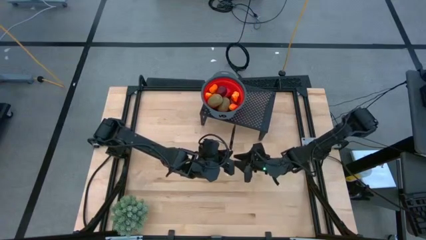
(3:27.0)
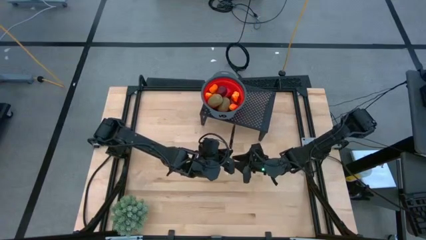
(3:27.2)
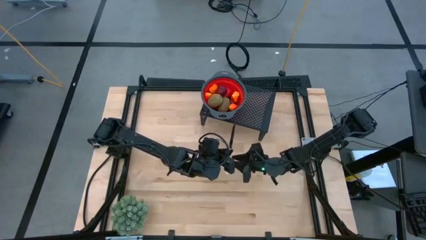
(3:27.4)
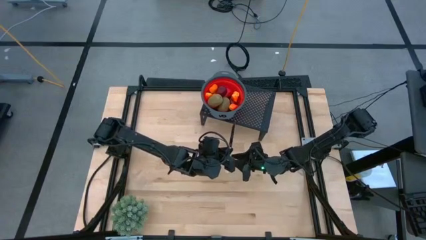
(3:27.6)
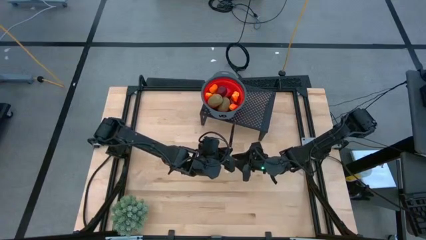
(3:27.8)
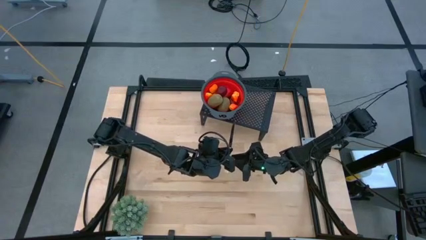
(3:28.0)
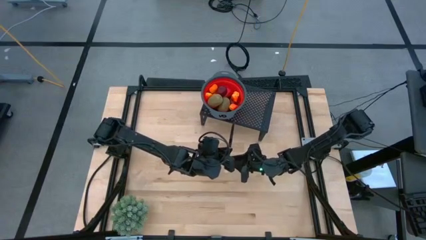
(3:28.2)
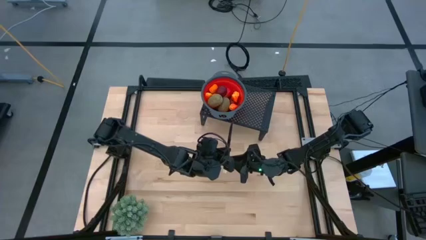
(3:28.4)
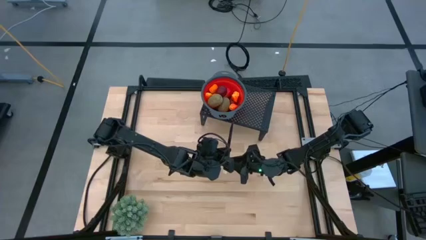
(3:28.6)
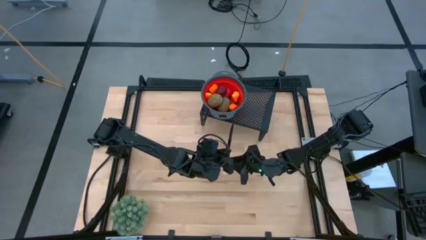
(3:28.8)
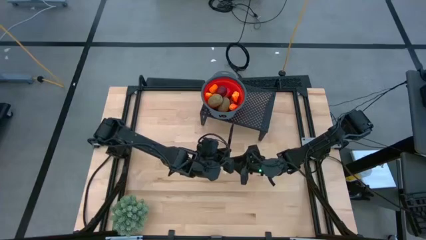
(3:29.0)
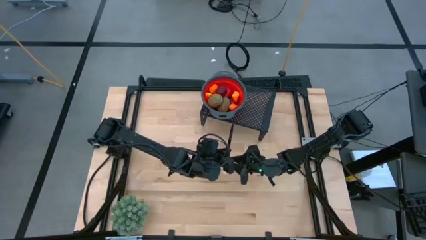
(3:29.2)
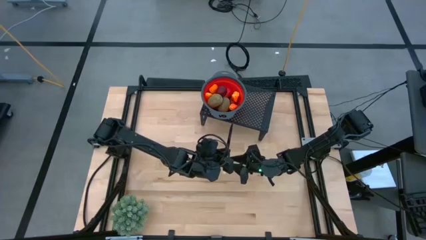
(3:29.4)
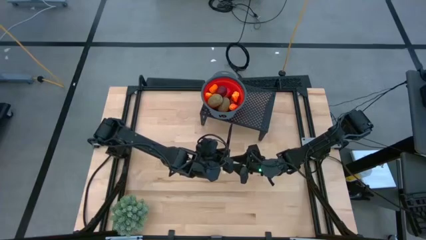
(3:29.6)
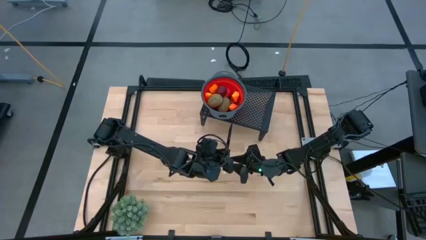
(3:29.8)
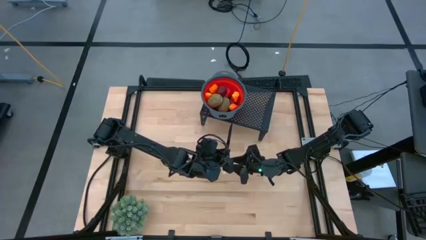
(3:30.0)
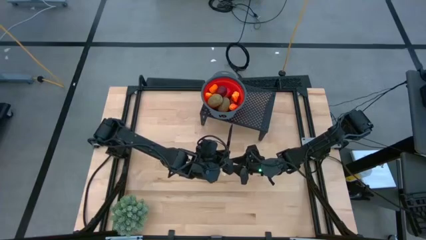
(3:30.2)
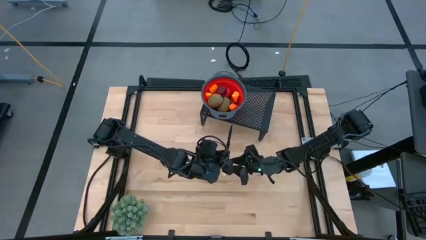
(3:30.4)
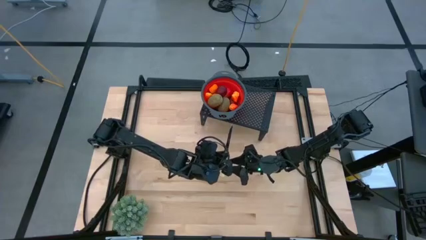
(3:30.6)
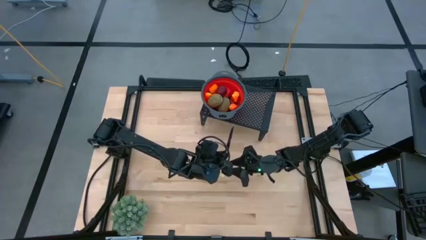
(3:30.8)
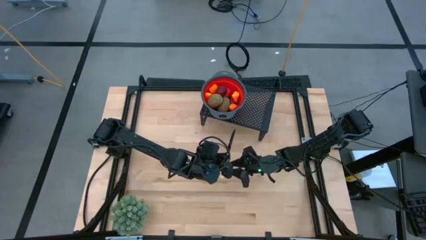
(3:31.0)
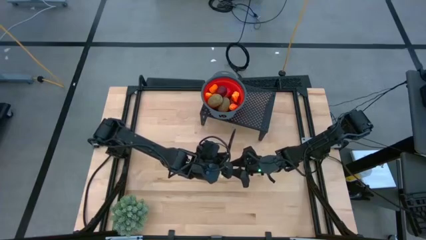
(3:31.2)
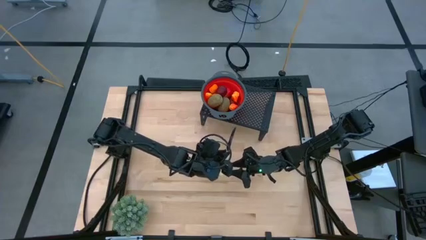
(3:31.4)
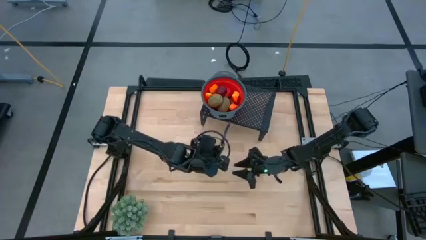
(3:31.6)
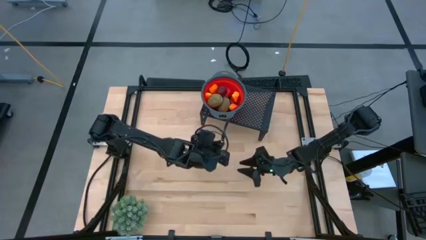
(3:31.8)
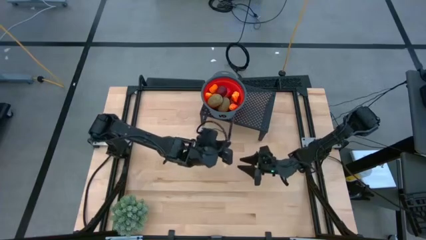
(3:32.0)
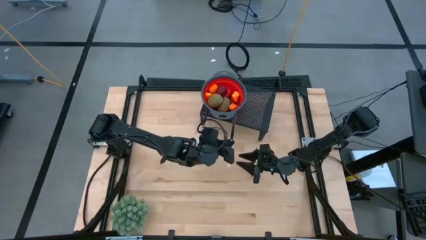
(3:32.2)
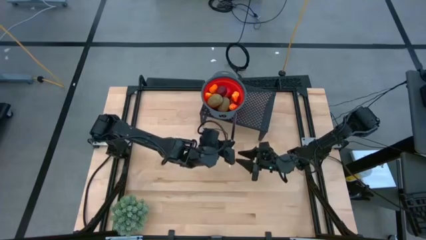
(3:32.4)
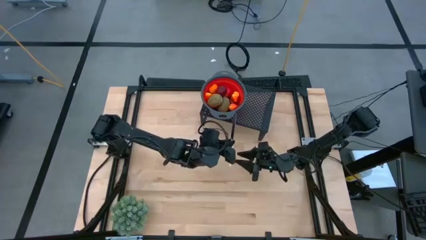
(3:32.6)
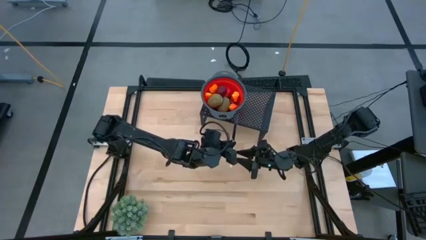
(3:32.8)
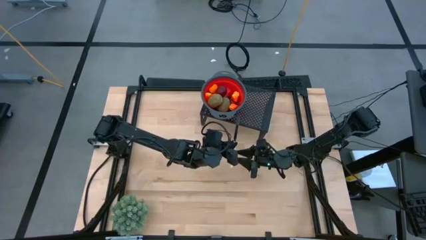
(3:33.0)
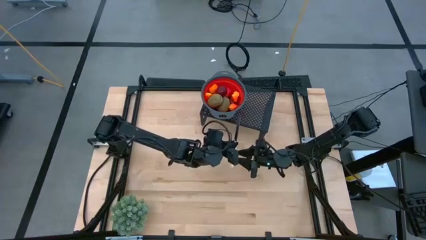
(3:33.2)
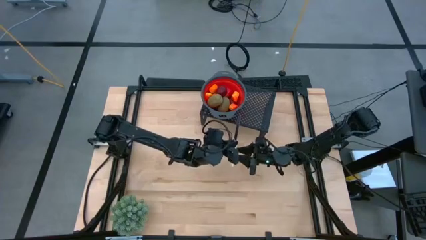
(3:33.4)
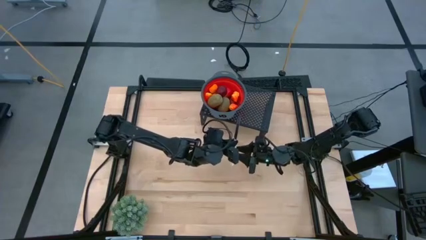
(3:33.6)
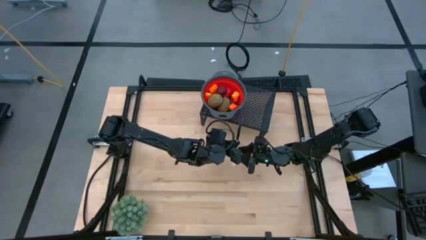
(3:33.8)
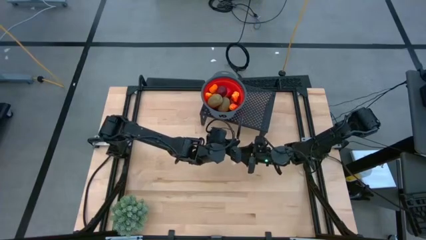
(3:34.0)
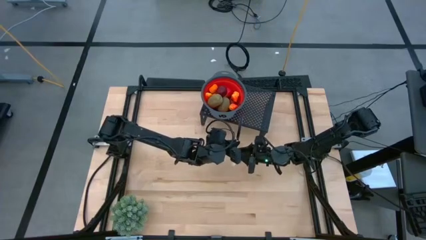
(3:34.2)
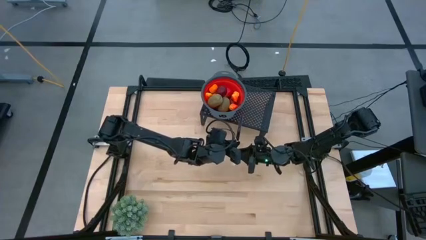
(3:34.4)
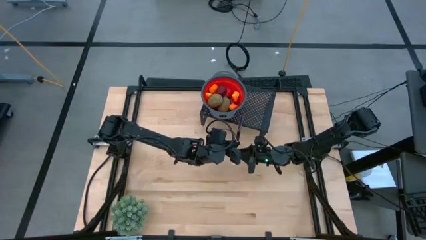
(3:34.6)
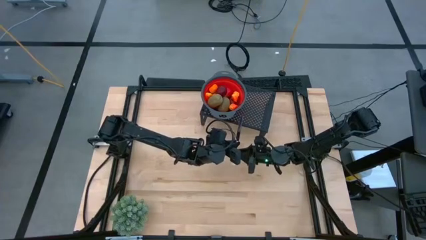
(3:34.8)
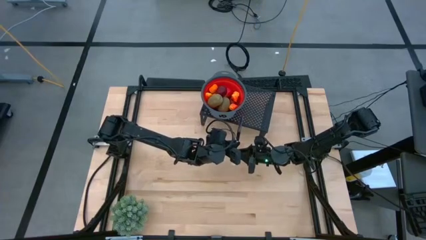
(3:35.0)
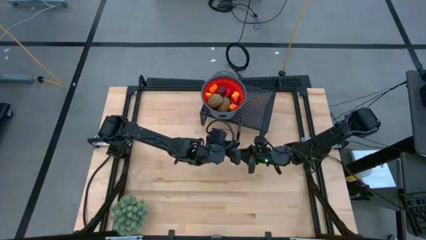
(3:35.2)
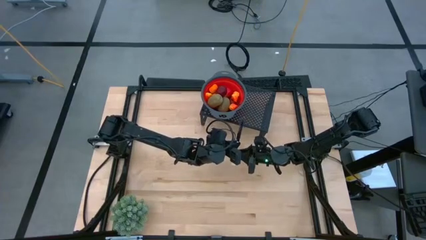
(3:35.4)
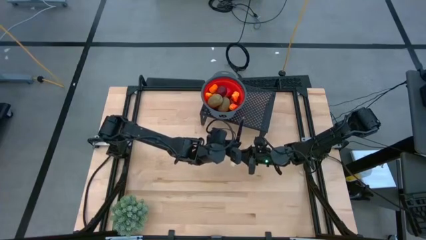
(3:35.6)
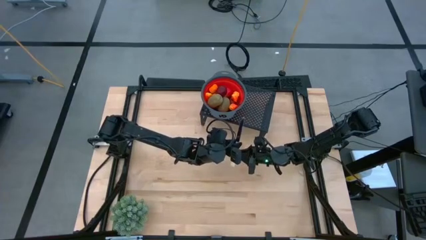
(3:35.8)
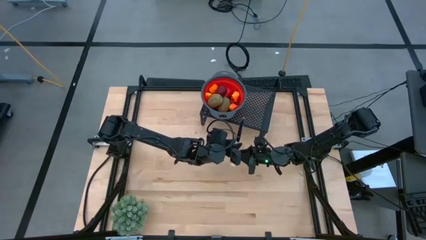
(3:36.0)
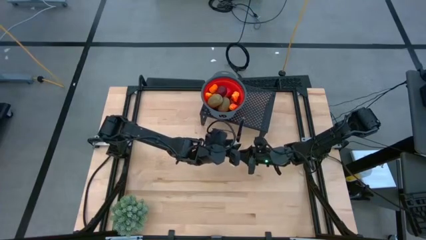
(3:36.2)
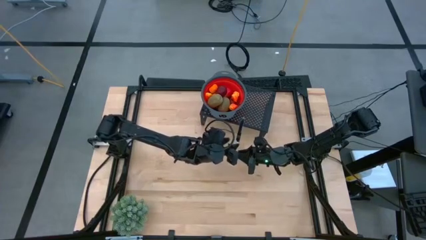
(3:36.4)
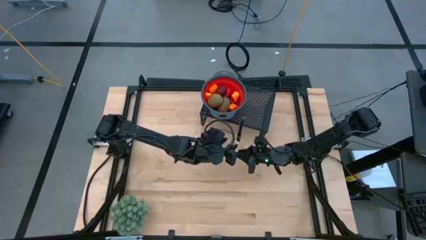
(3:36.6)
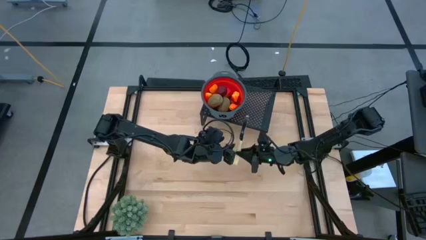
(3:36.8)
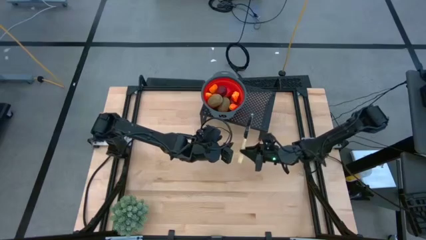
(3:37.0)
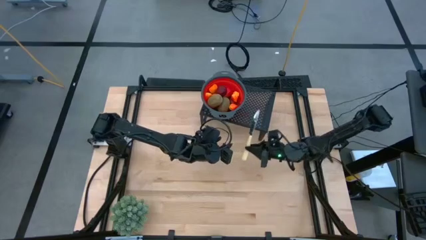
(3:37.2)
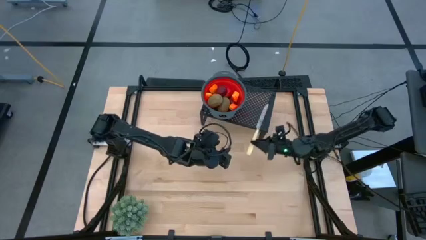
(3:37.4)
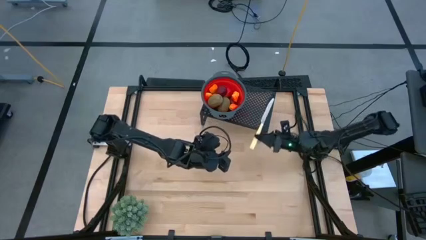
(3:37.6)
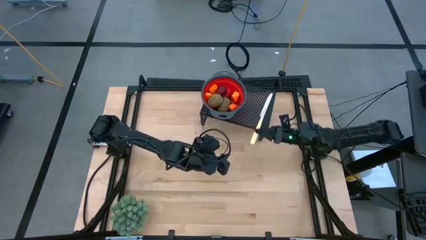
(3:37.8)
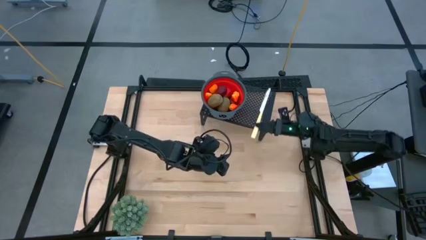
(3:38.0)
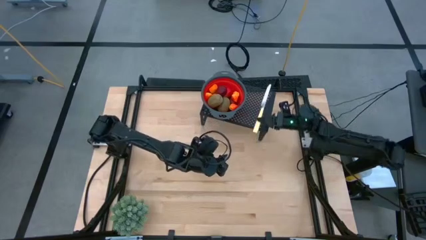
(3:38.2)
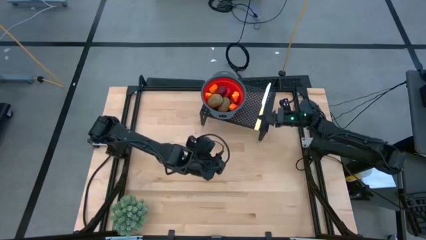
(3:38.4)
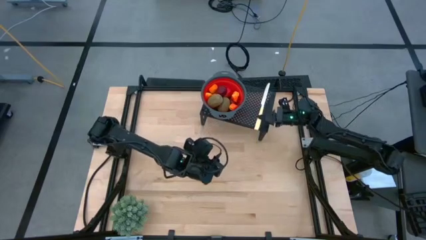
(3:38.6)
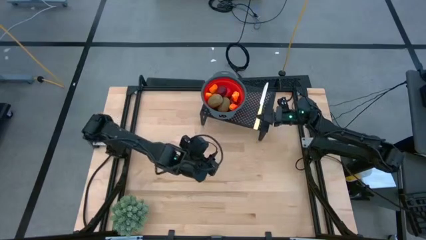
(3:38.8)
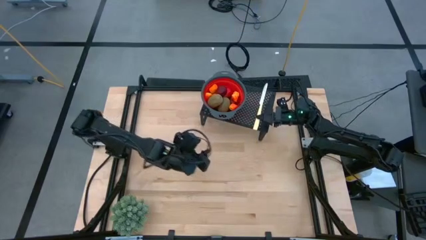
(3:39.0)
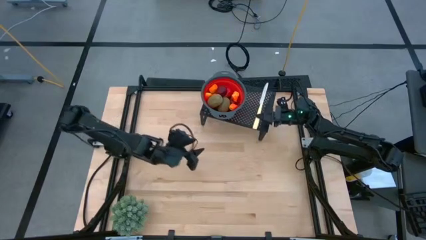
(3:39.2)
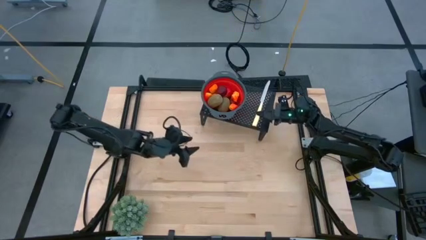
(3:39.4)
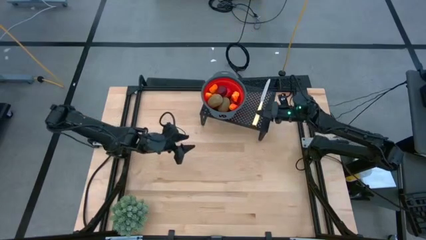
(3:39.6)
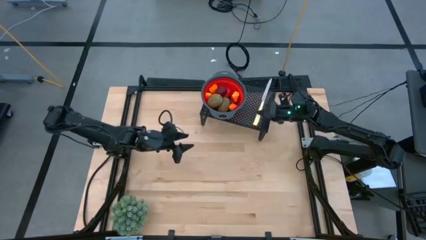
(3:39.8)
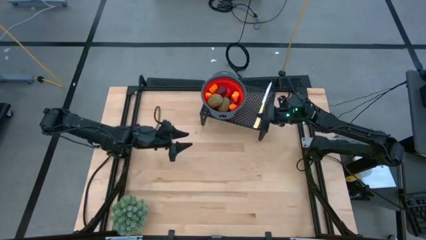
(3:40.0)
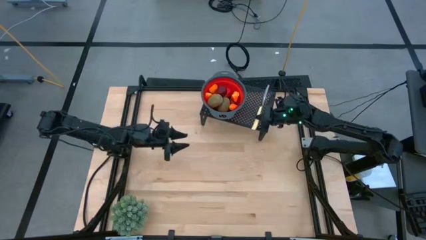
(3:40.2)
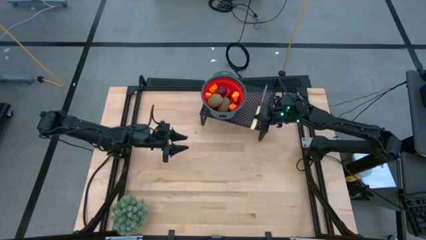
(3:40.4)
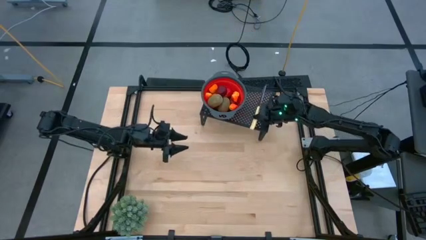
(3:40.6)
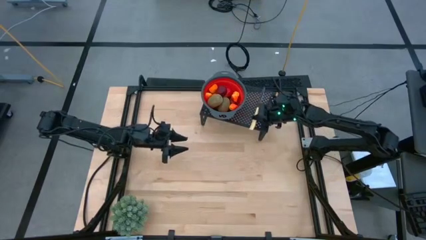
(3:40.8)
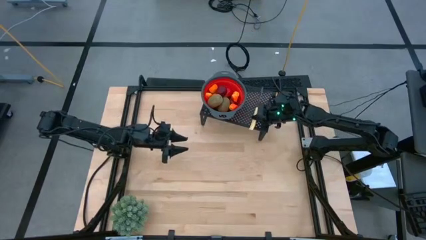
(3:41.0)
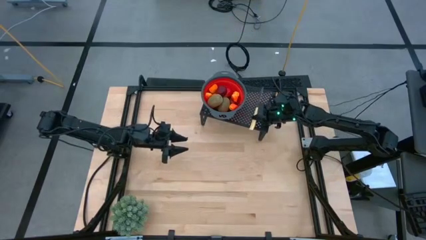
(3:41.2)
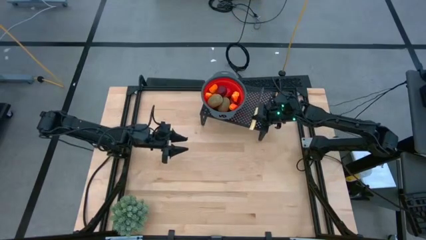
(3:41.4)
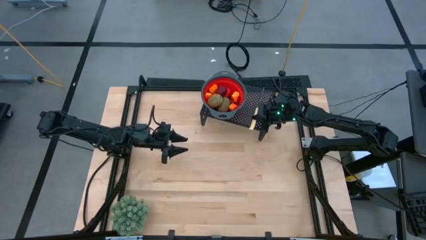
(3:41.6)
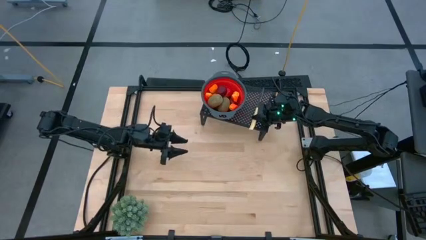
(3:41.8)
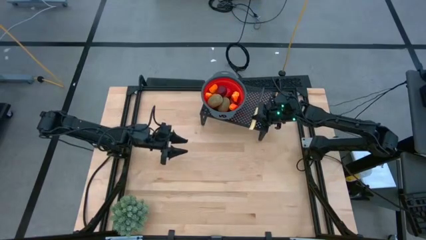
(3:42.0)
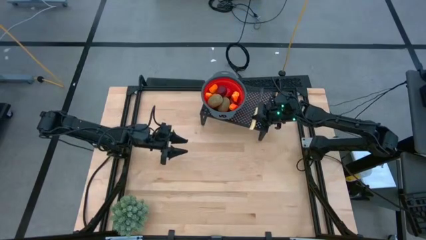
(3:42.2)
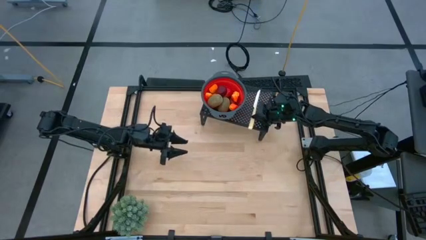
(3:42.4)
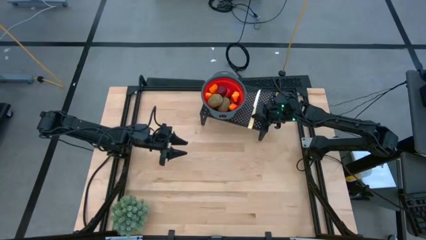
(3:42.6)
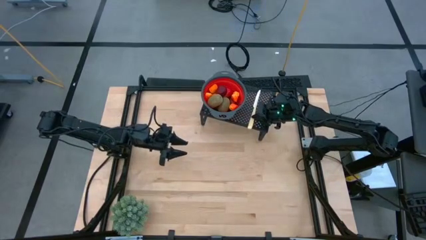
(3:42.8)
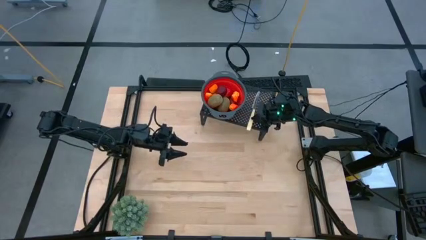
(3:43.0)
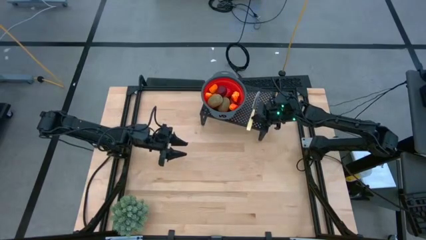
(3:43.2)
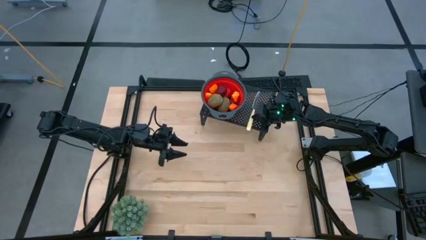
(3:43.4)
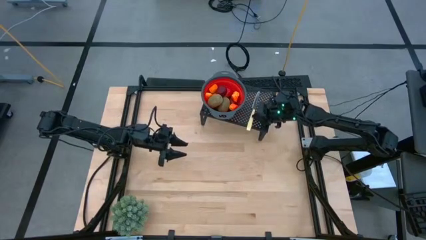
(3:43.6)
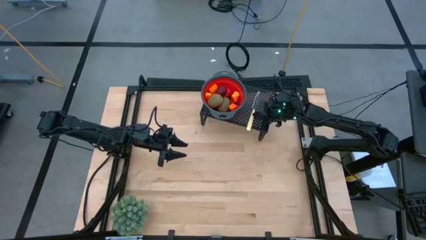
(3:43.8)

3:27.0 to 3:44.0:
Task: Pick & Place Fruit
Put the knife on the shelf to the right of the strainer bowl
